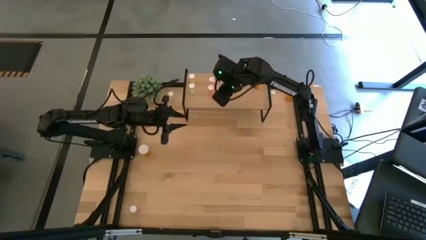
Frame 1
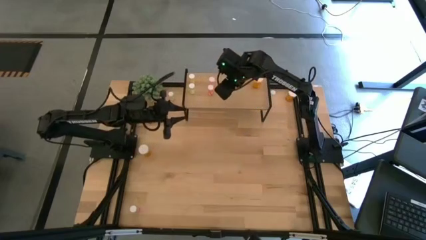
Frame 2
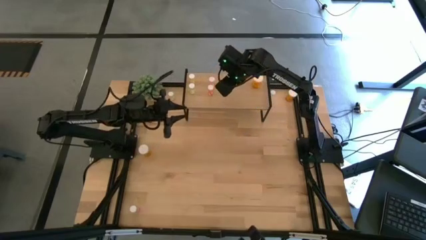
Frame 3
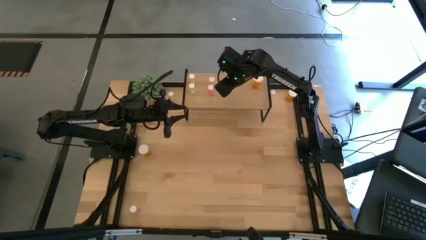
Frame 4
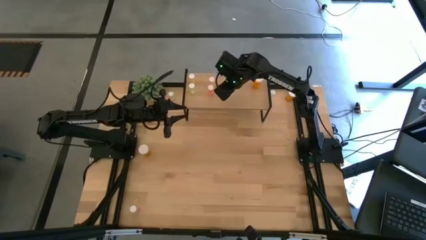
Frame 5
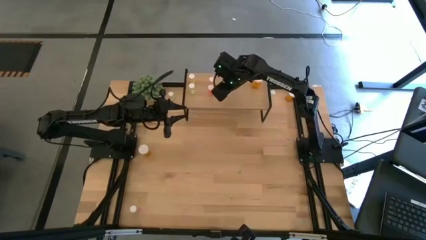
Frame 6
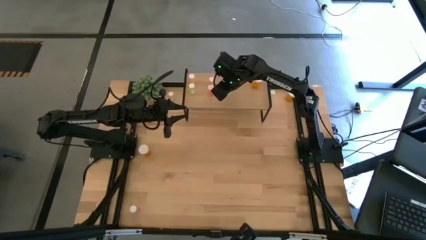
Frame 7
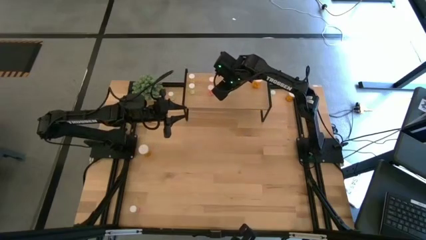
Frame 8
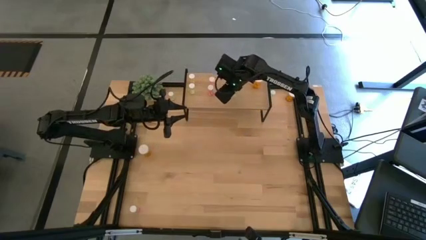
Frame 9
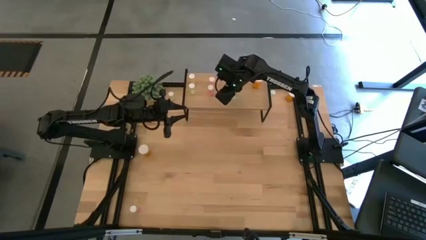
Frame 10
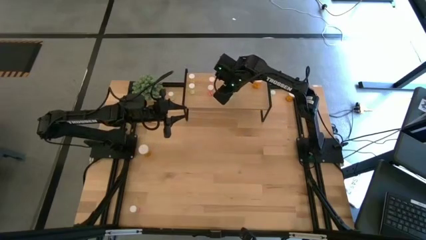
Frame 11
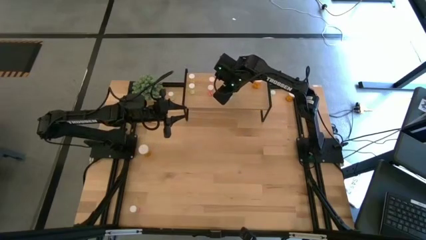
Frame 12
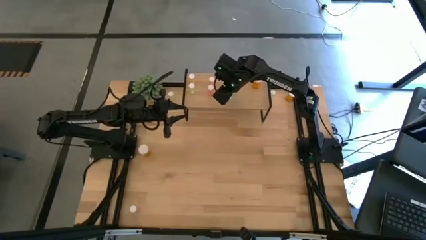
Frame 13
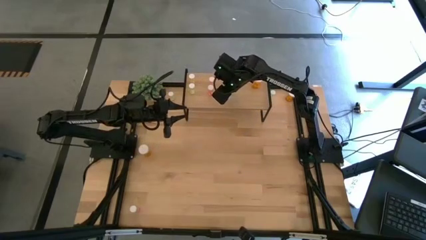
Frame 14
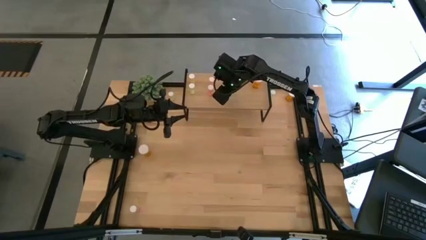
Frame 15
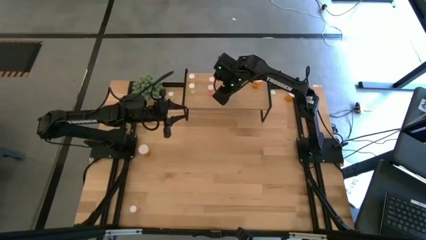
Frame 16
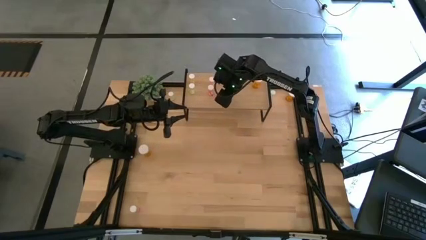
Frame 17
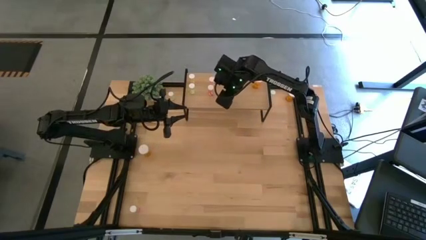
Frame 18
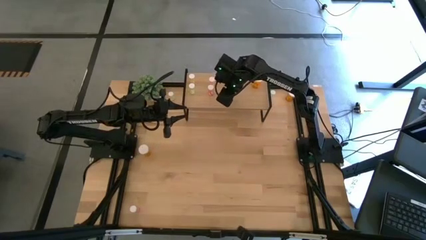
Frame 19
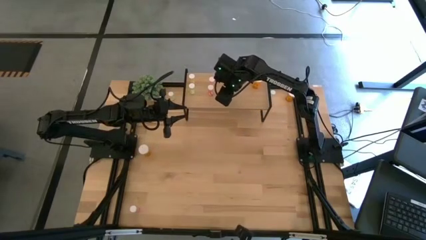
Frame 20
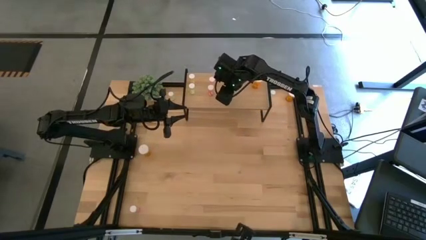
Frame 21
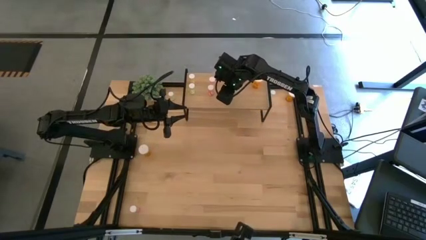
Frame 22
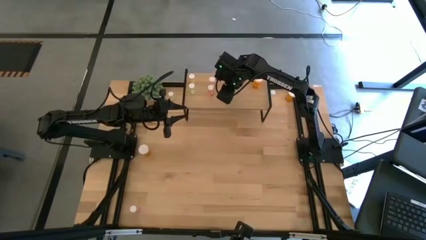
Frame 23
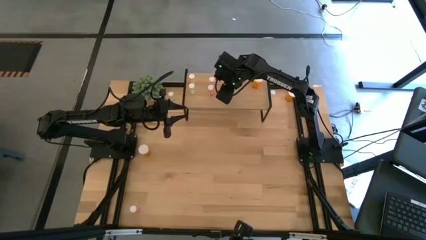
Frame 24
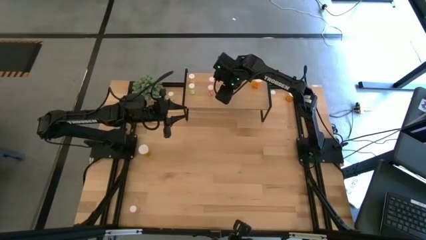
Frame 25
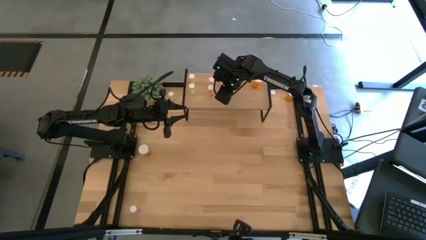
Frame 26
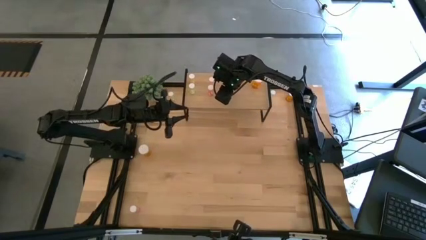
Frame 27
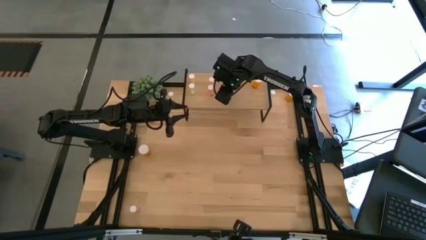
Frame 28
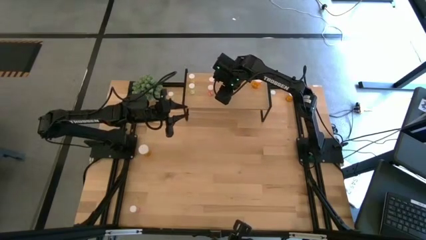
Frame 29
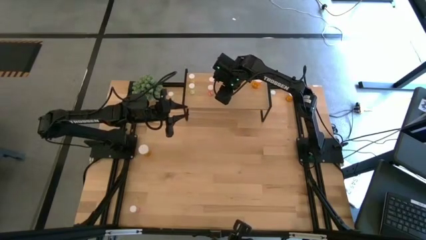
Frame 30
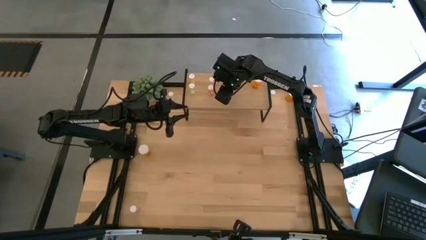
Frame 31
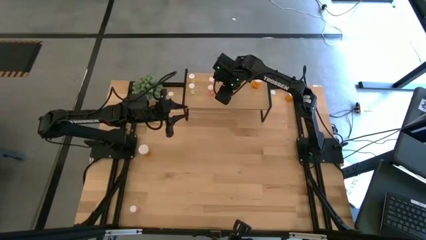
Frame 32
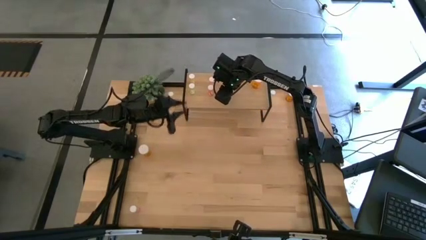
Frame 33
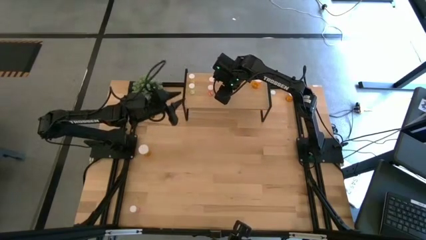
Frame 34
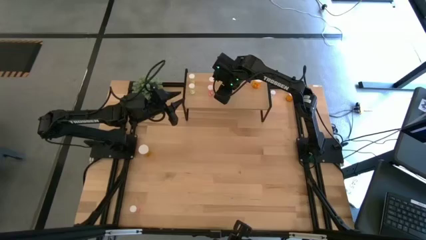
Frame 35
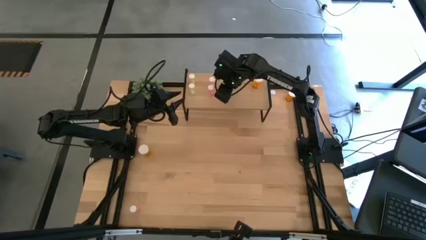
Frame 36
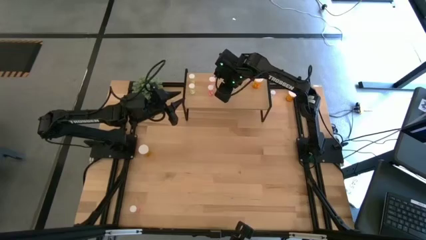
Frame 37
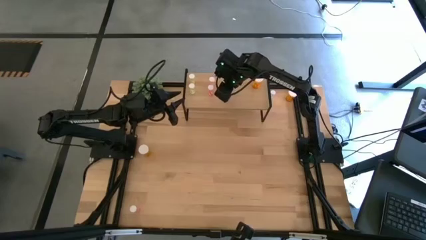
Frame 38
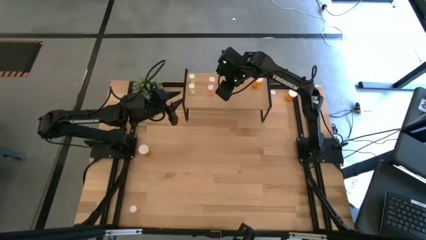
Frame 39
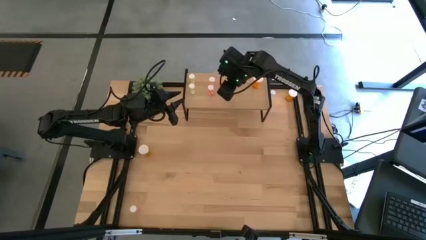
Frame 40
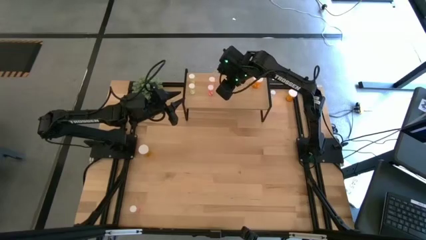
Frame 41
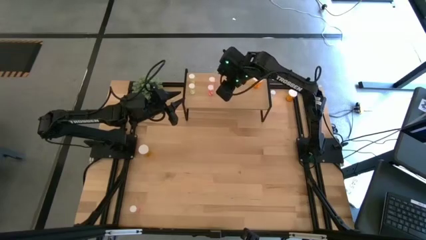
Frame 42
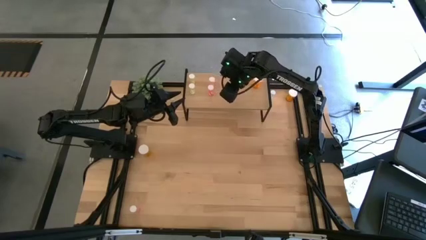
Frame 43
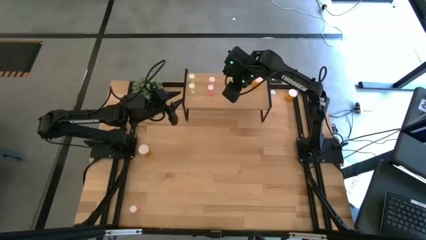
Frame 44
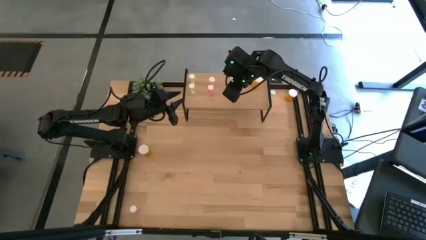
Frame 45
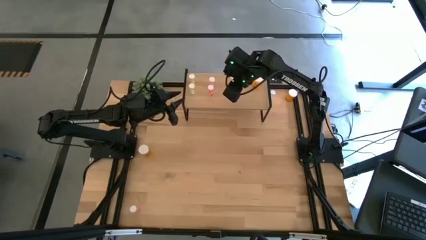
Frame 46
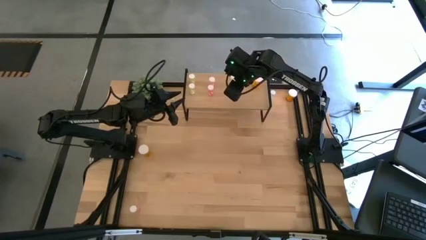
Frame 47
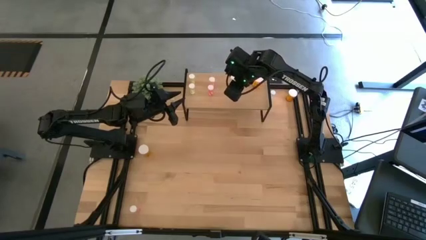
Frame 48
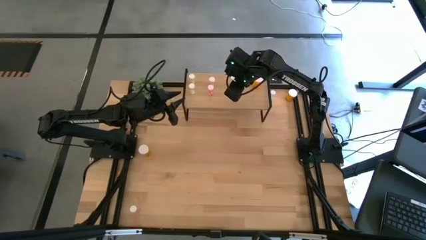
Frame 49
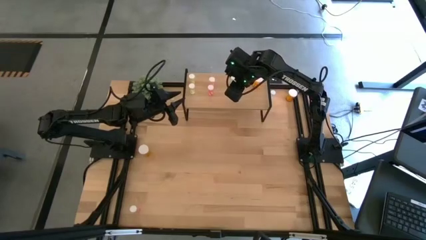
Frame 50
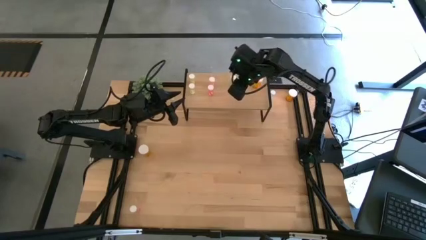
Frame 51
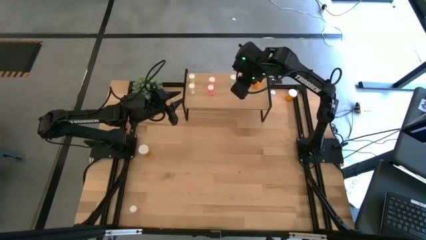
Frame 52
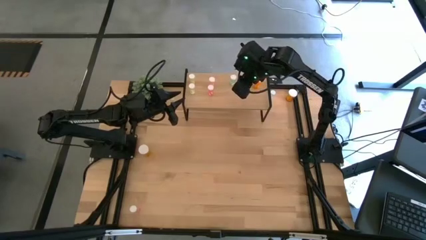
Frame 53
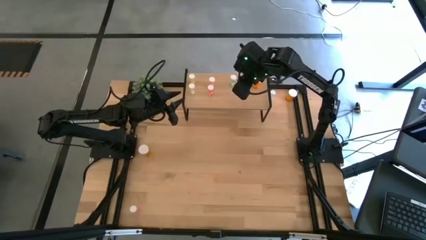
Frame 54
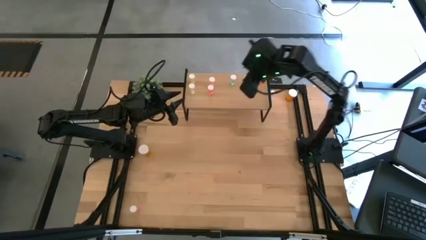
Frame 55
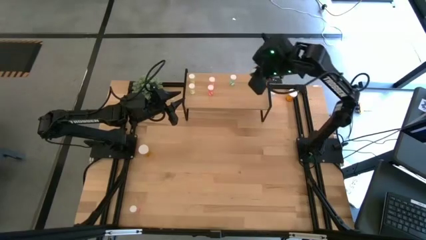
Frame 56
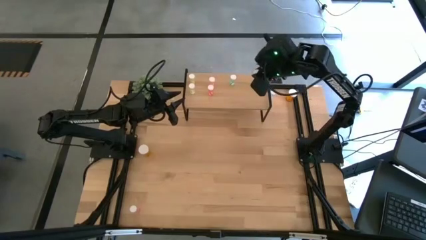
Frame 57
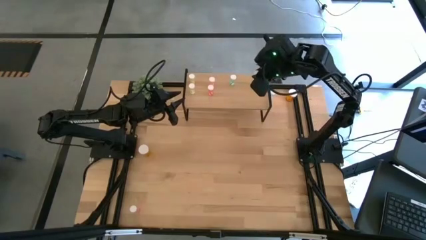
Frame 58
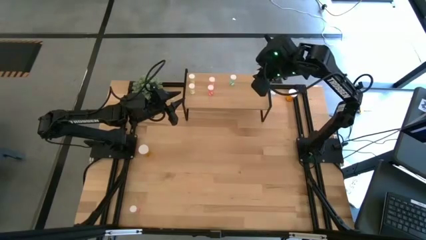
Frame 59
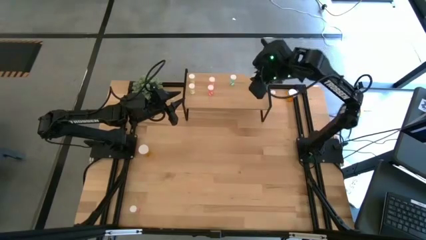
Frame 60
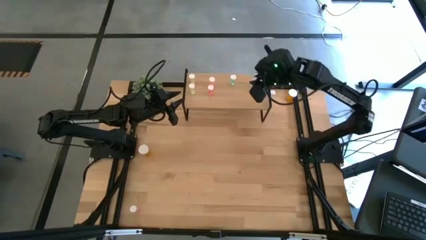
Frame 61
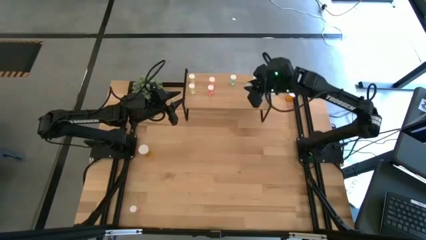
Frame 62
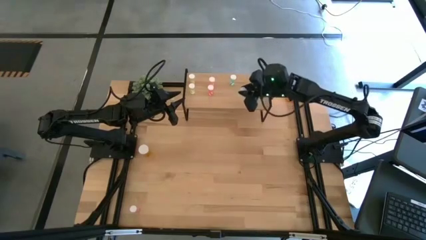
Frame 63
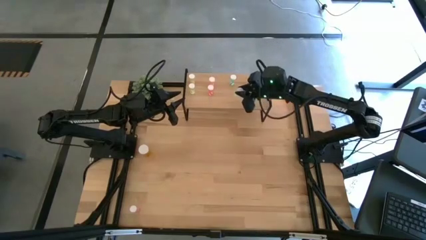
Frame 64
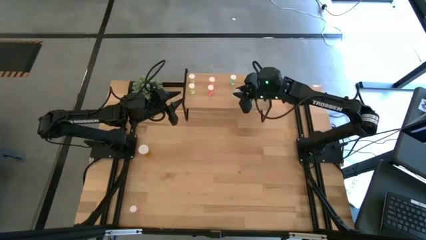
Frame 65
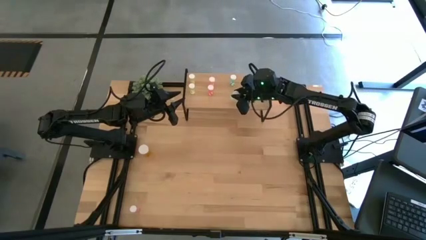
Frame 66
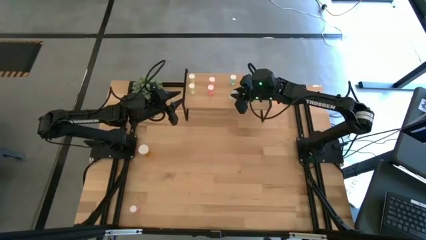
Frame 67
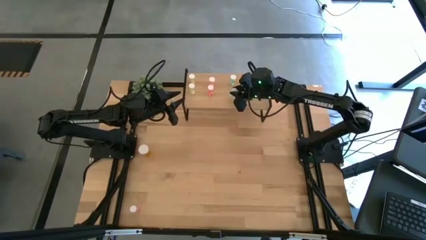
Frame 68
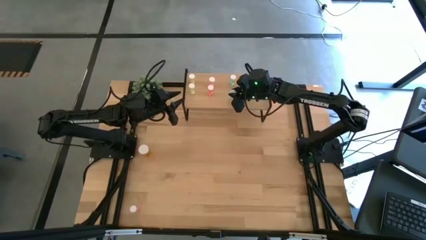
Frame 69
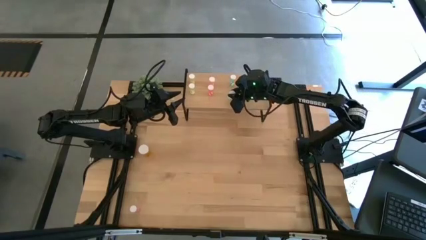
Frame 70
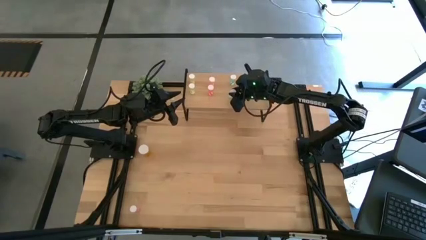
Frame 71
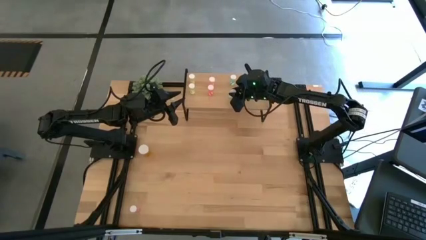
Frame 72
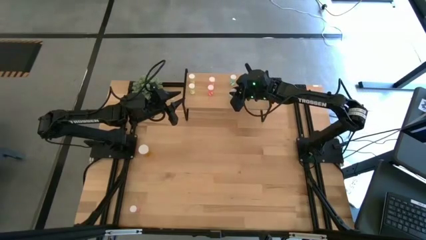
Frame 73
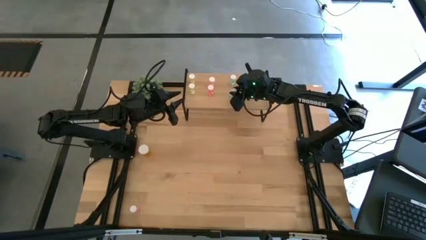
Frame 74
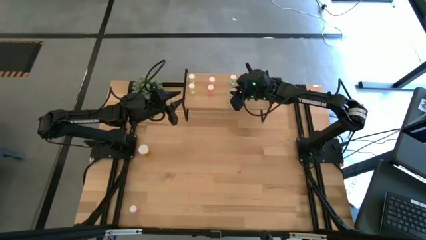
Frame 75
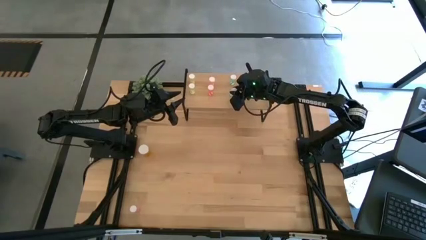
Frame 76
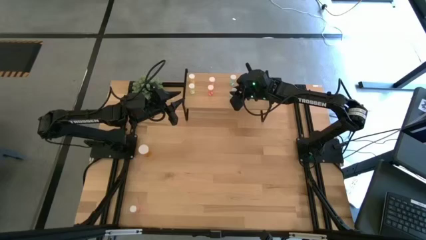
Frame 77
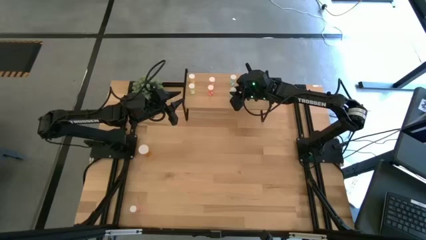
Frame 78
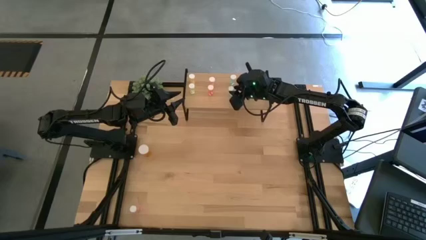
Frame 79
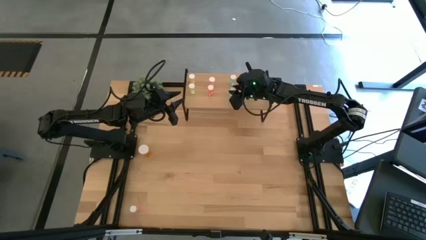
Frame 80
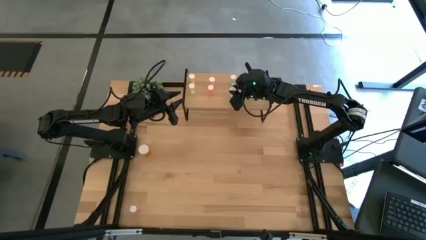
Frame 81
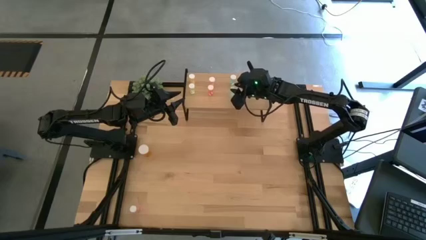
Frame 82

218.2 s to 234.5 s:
Task: Pick and place medicine bottles onto shelf by color
Put the bottom blue pill bottle on the shelf aligned with the other blue pill bottle
